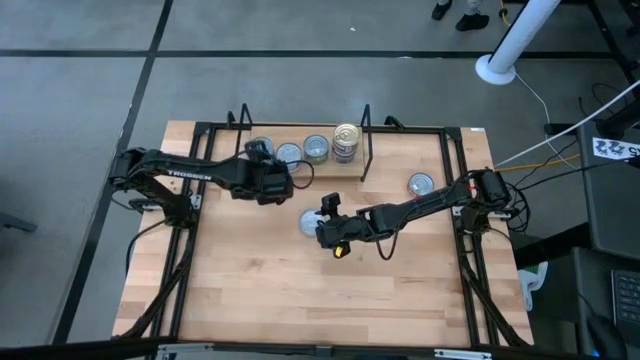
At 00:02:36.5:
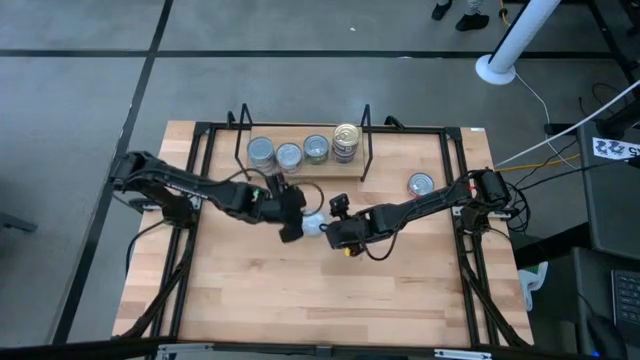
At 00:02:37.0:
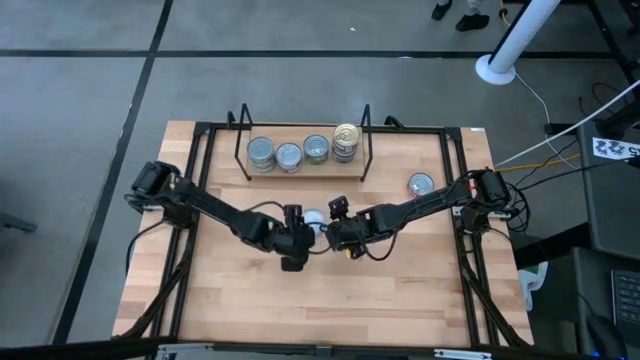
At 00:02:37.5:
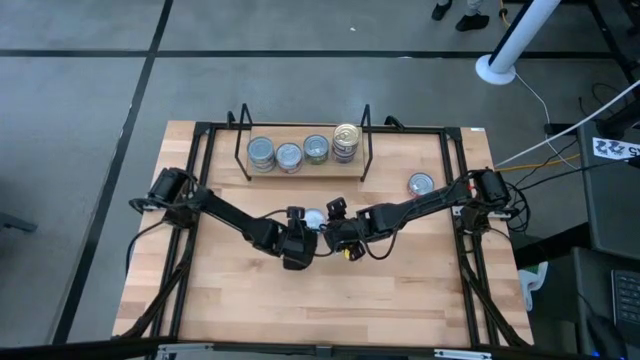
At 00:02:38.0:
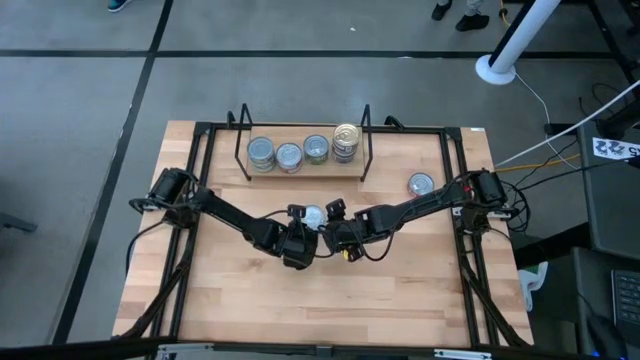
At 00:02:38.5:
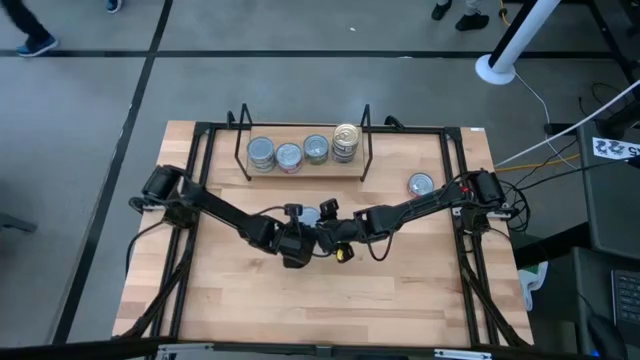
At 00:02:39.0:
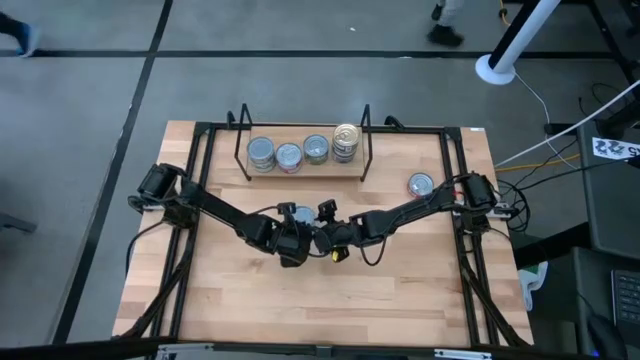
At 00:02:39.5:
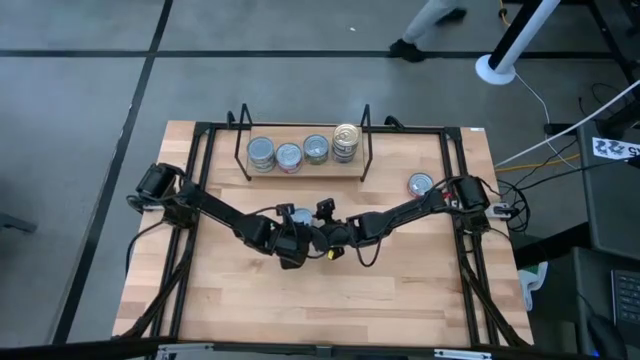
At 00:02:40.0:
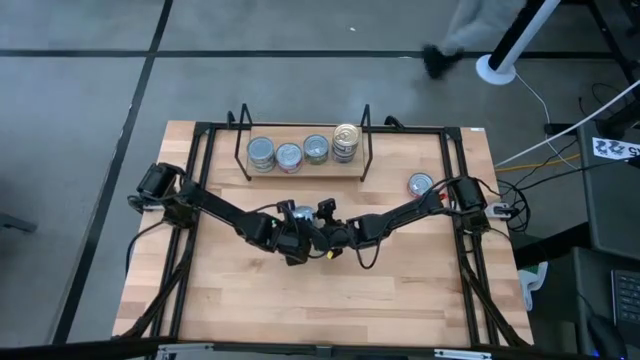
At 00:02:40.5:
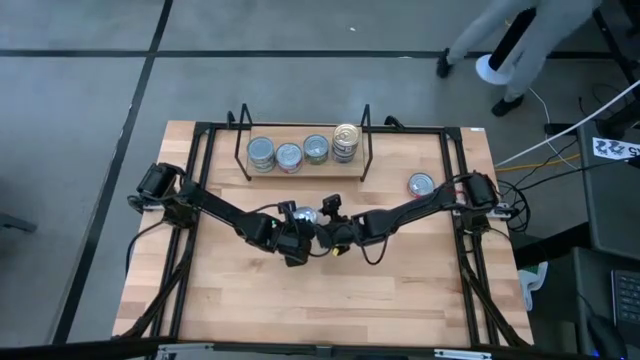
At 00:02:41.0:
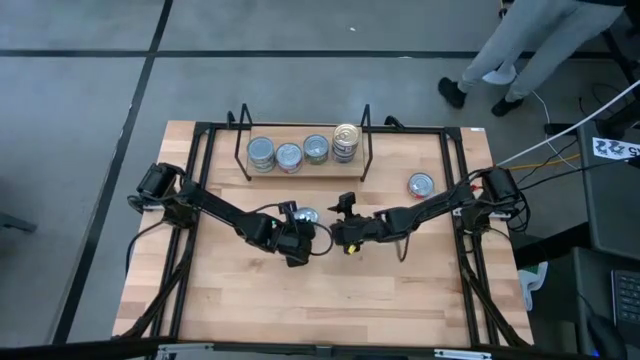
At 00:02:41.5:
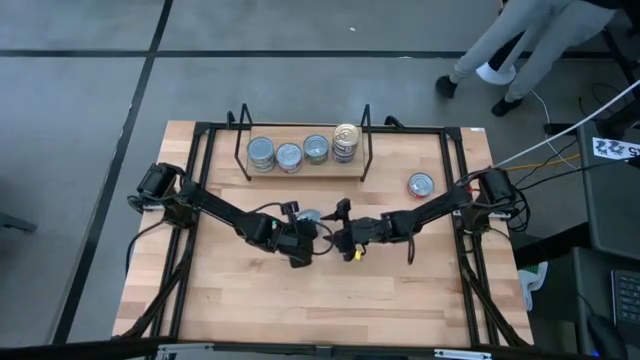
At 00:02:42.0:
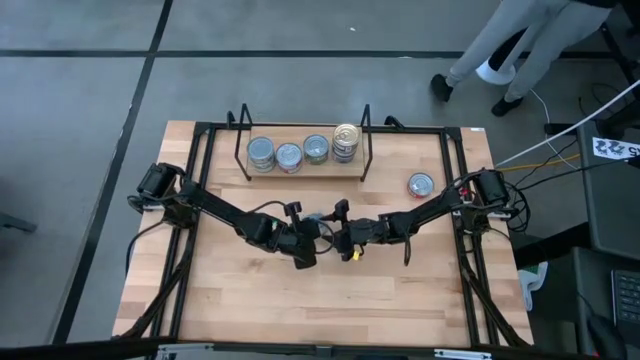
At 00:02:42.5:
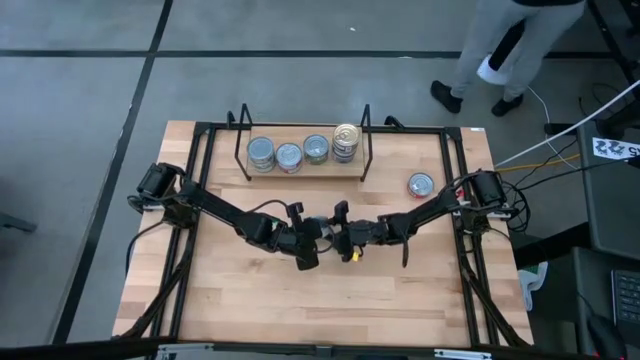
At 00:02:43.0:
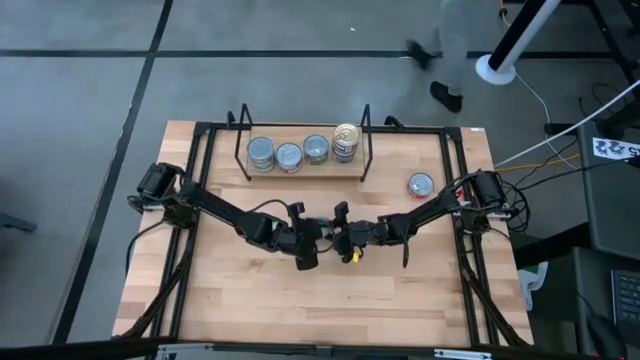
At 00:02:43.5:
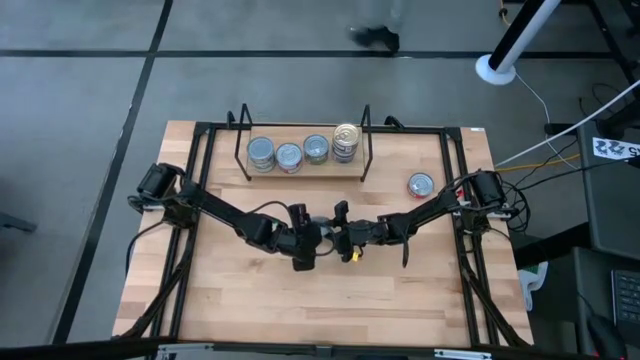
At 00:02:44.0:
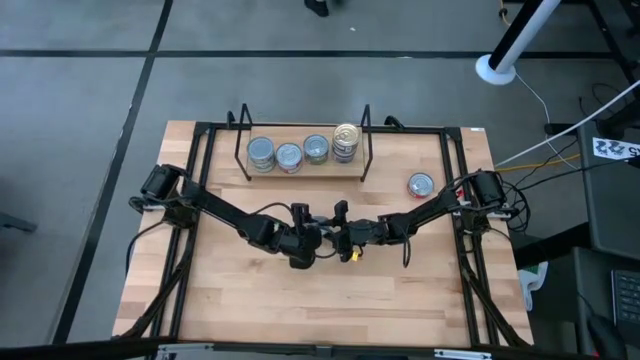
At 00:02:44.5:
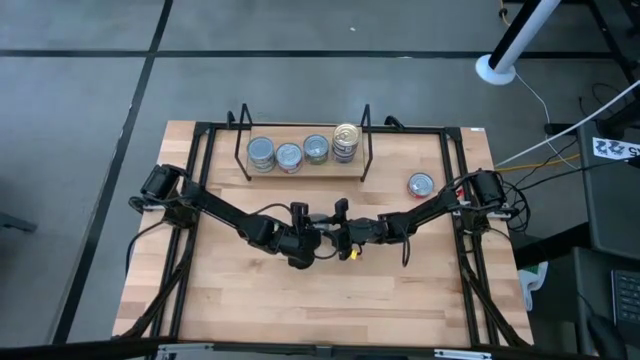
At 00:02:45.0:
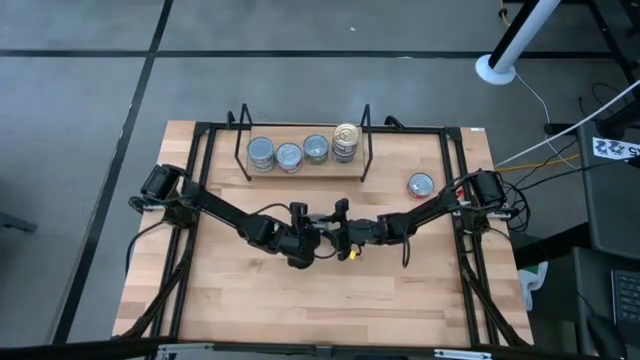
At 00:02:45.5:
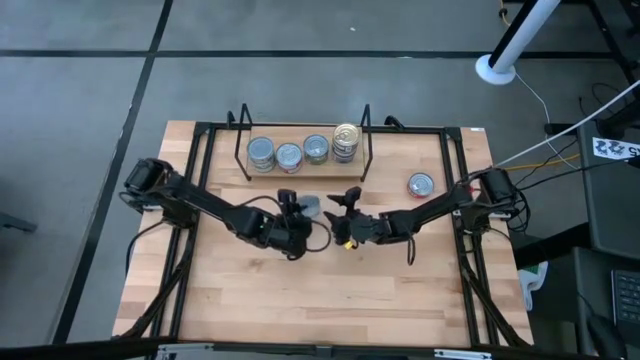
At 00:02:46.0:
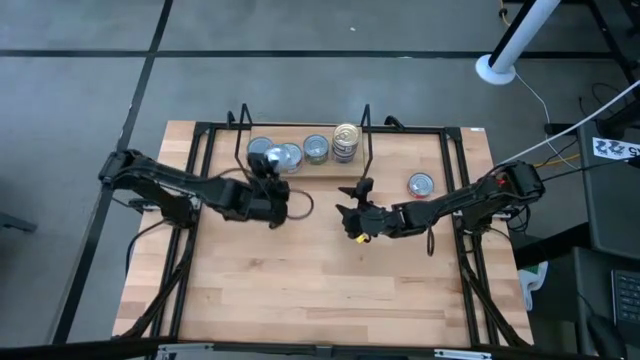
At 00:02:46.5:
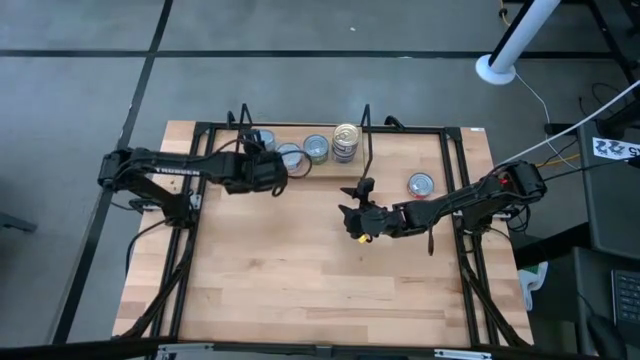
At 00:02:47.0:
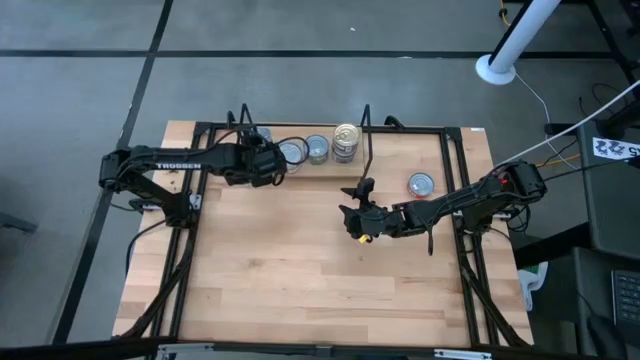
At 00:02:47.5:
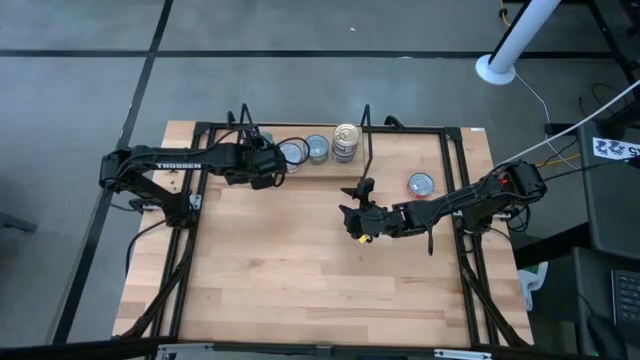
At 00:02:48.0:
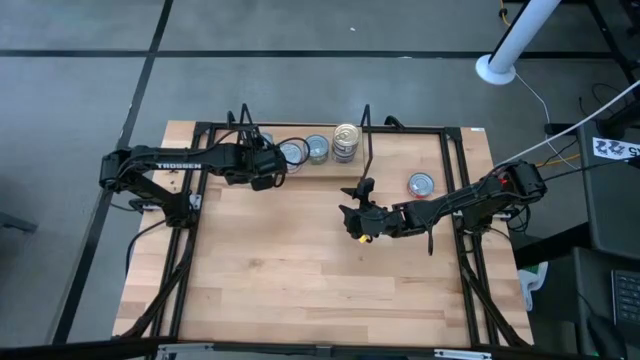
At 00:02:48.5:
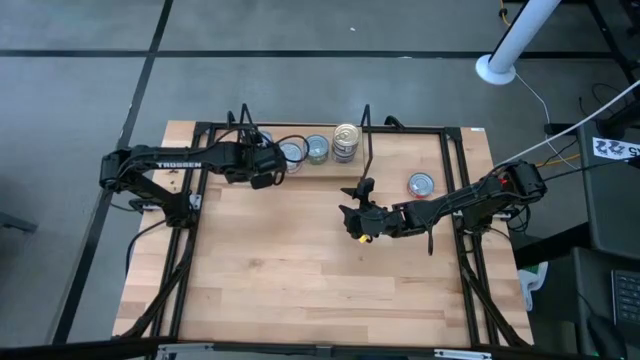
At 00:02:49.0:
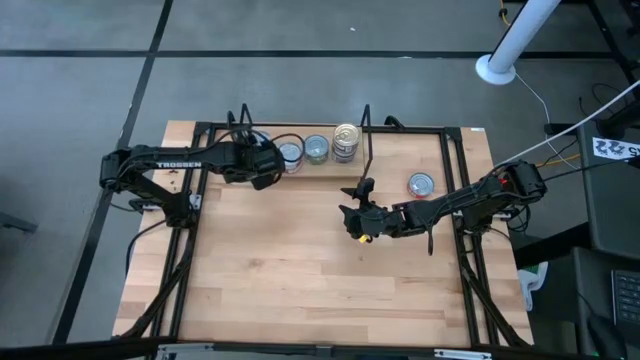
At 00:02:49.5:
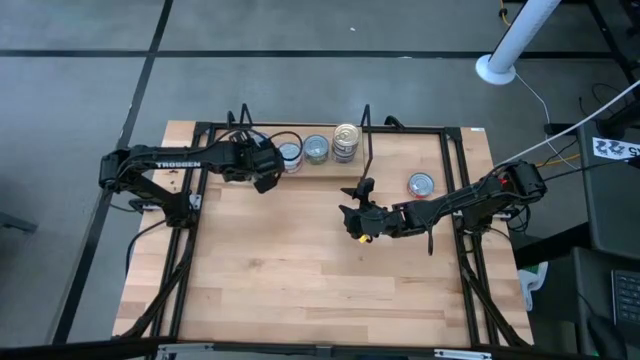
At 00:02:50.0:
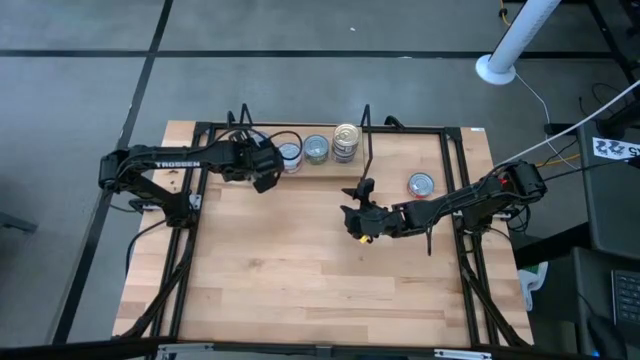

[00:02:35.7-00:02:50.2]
Task: Stack canned seafood by type on shelf
Stack the green-white tuna can on top of the green-white tuna can on the shelf

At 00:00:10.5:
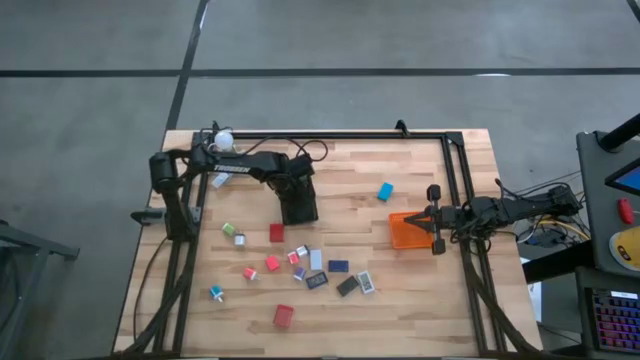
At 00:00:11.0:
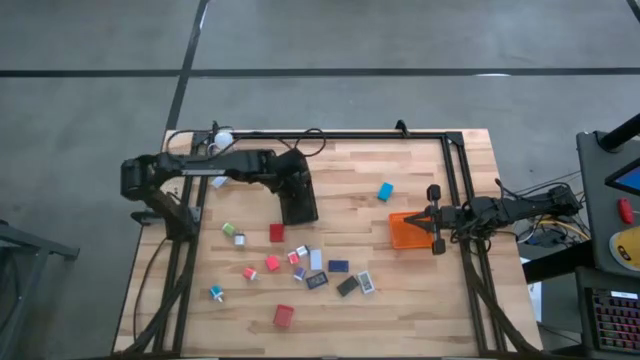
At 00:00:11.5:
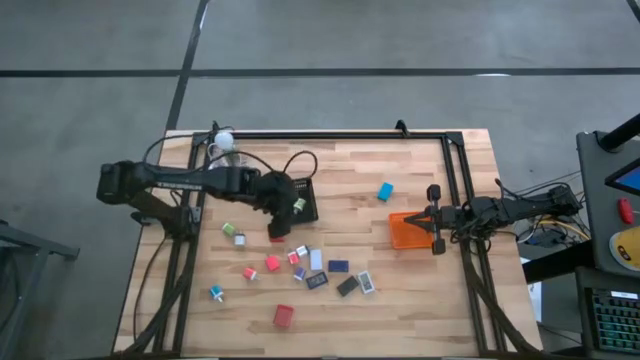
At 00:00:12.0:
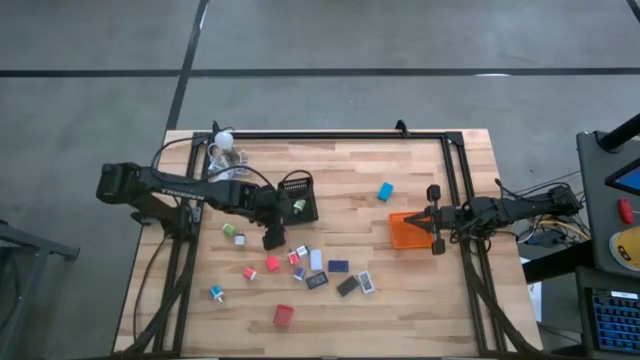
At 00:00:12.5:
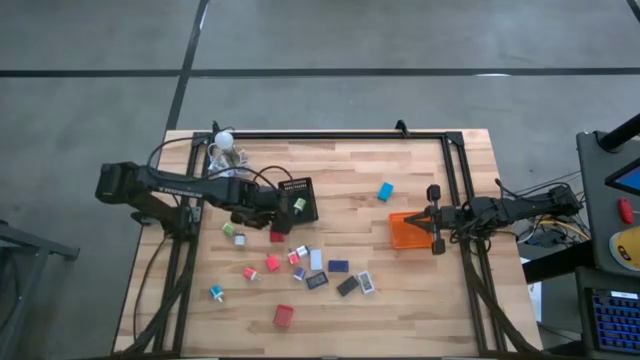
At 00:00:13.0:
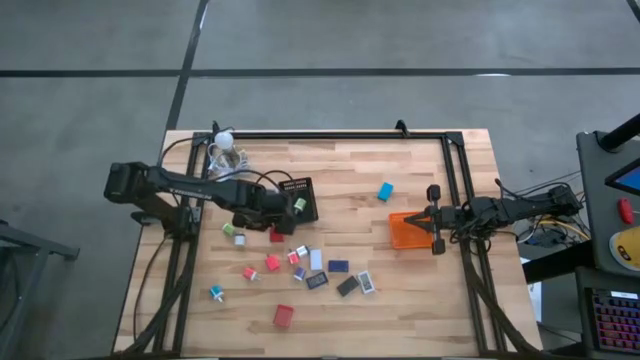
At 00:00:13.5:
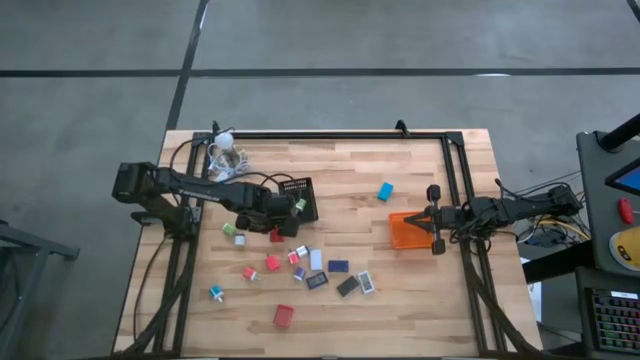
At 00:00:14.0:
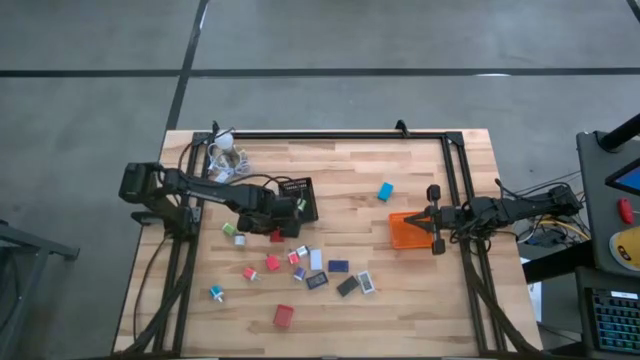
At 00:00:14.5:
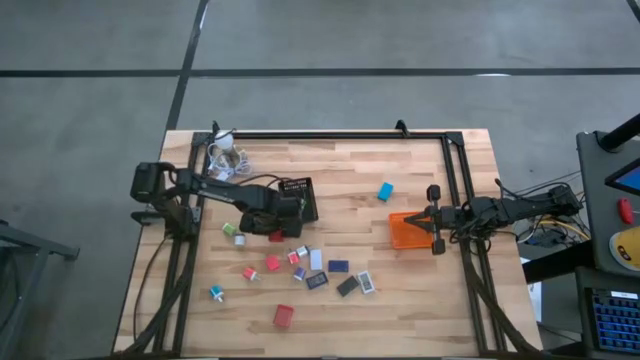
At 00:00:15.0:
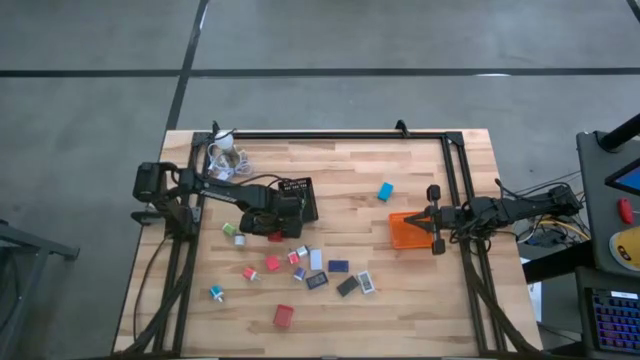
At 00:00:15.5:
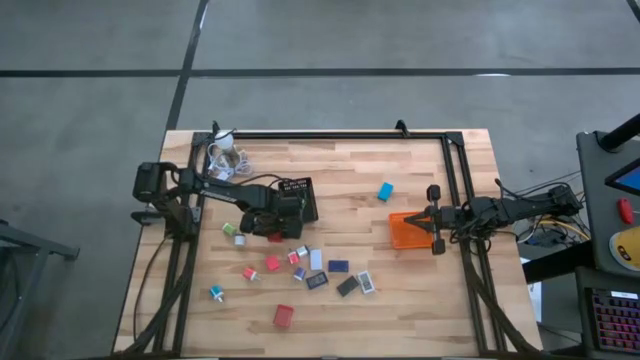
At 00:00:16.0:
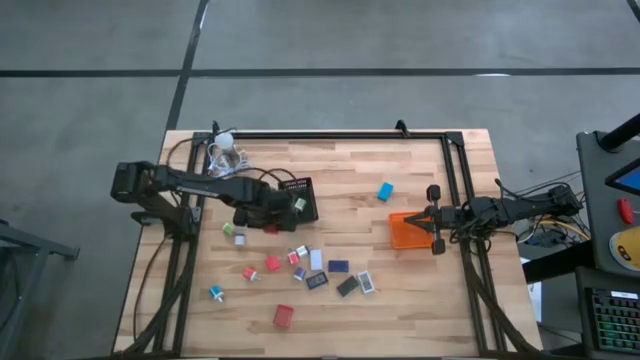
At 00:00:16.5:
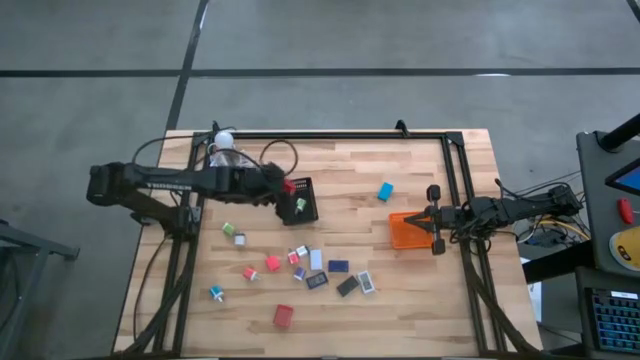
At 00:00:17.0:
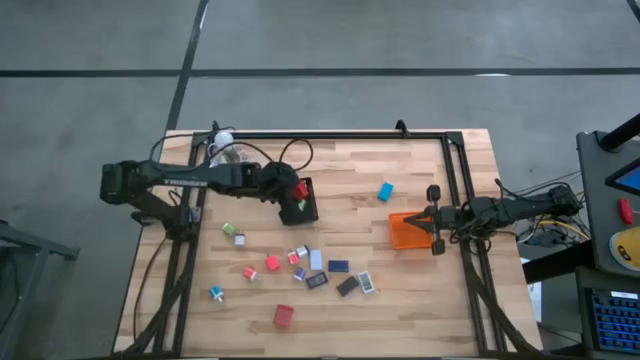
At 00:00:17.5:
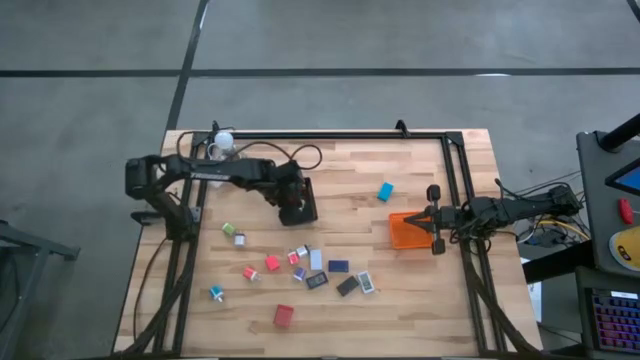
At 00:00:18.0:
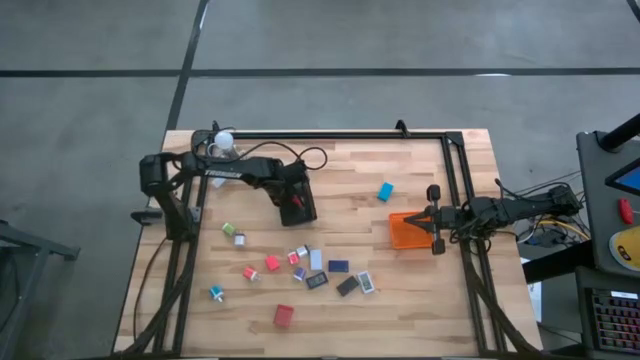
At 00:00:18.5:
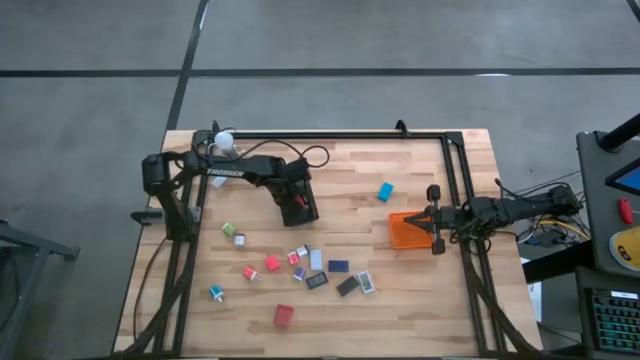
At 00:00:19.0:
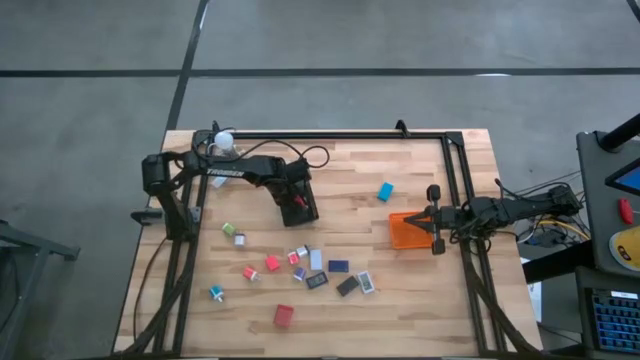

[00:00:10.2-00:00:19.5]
Task: Pick & Place Office items
Put the top red charger adapter in the black bin
